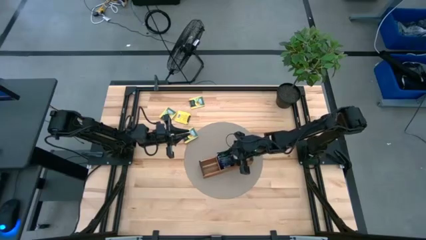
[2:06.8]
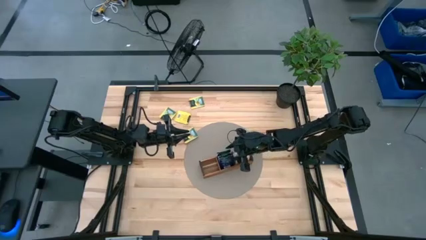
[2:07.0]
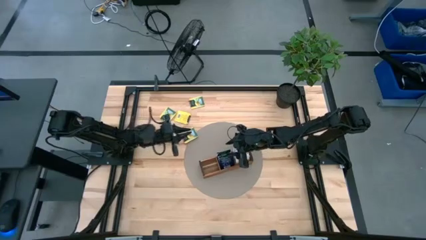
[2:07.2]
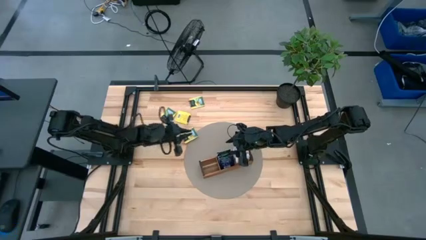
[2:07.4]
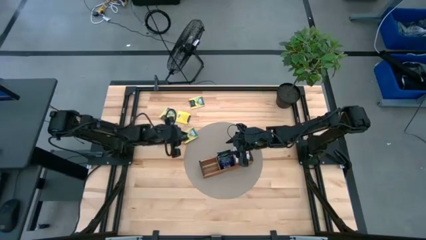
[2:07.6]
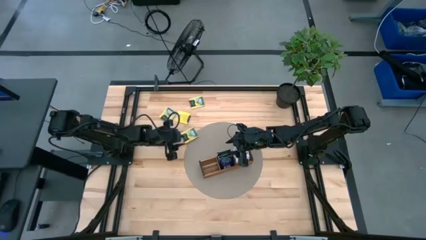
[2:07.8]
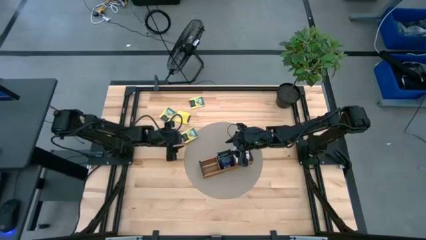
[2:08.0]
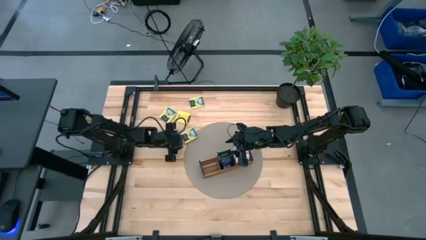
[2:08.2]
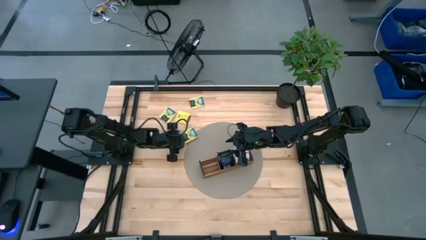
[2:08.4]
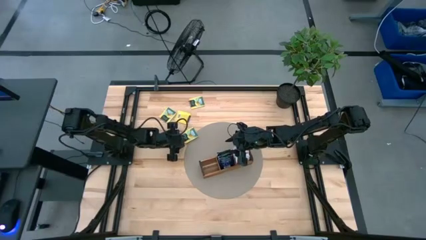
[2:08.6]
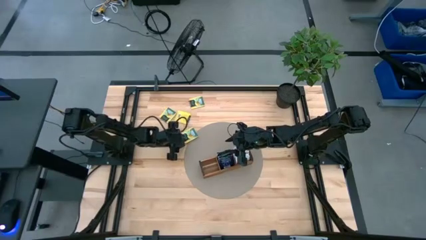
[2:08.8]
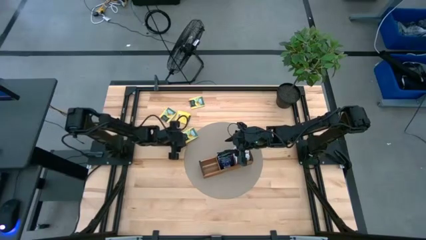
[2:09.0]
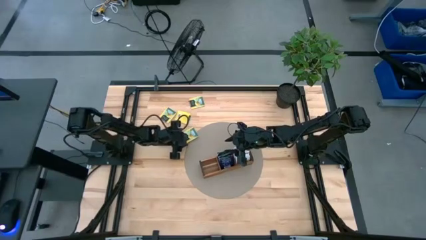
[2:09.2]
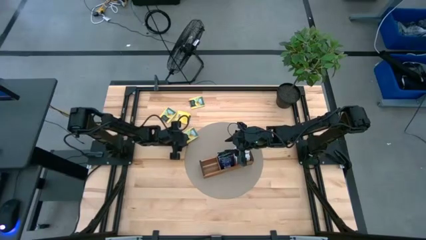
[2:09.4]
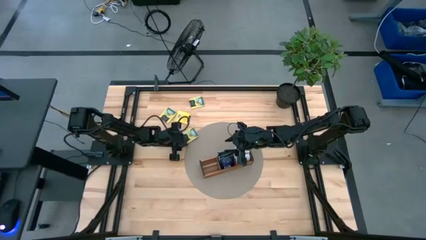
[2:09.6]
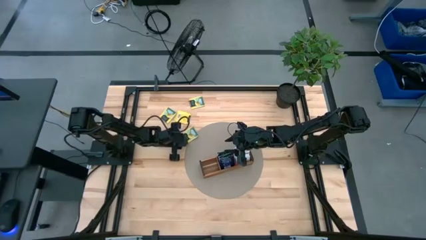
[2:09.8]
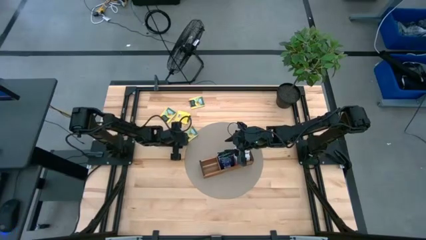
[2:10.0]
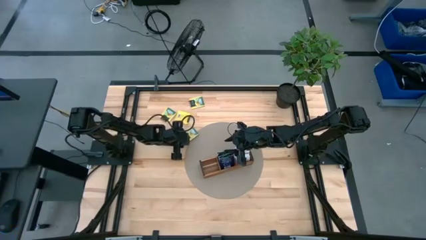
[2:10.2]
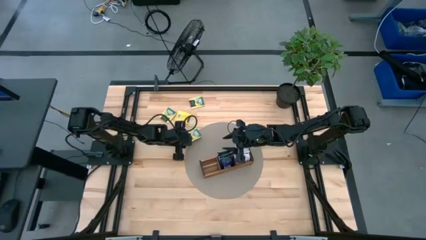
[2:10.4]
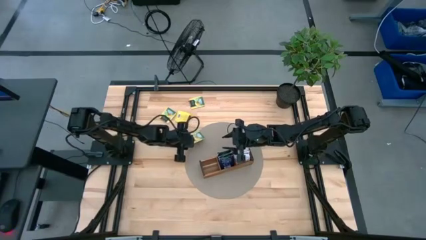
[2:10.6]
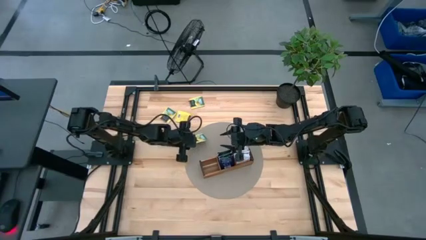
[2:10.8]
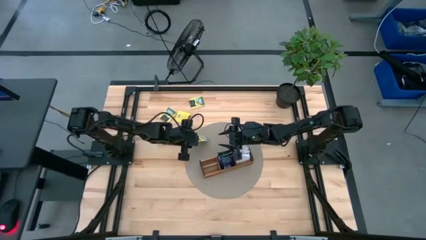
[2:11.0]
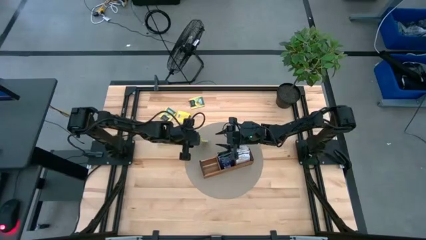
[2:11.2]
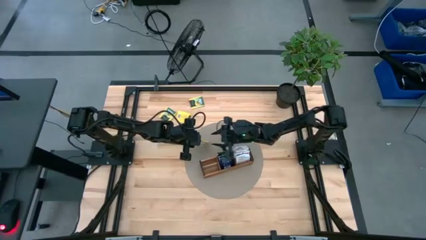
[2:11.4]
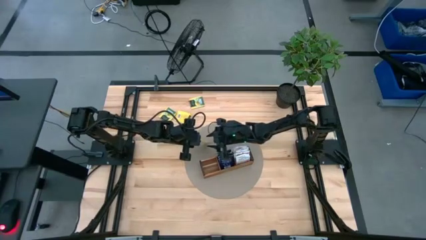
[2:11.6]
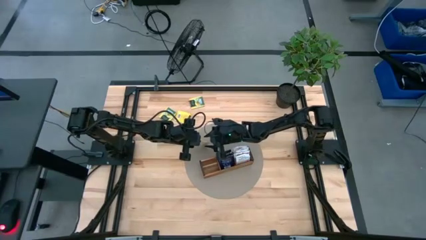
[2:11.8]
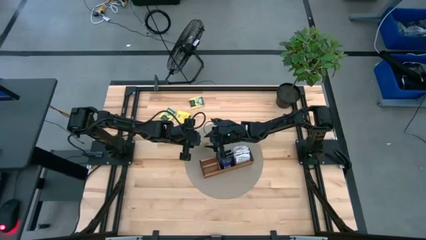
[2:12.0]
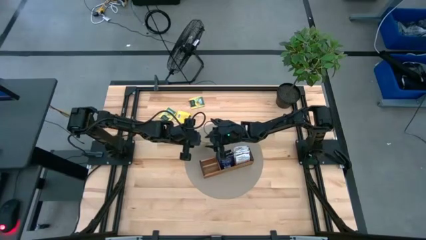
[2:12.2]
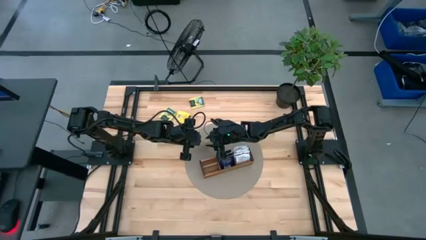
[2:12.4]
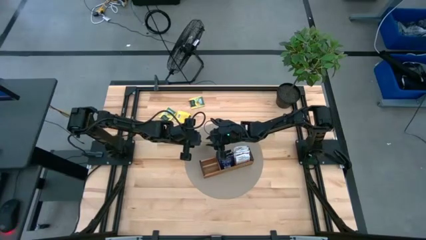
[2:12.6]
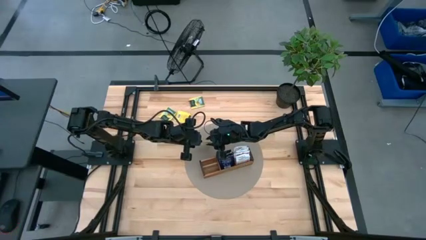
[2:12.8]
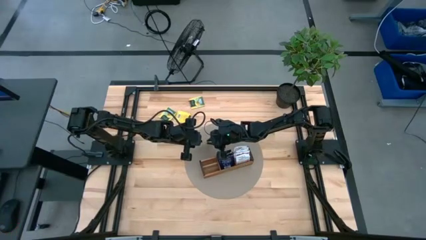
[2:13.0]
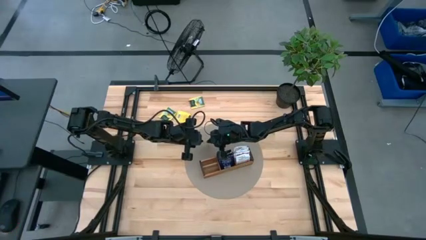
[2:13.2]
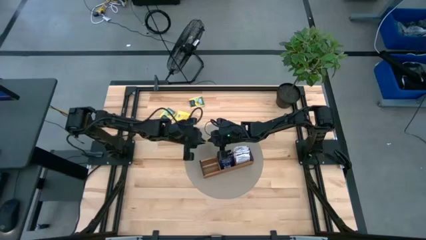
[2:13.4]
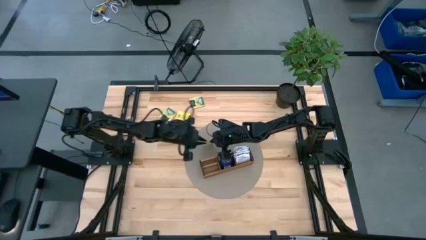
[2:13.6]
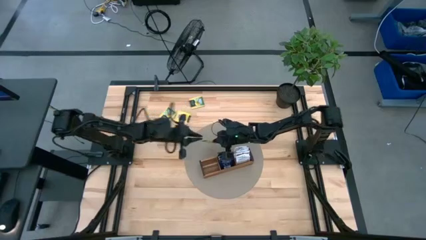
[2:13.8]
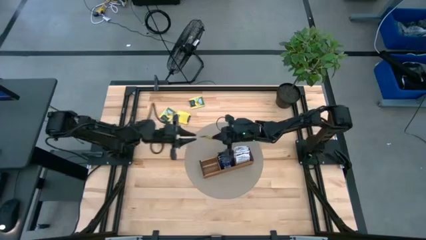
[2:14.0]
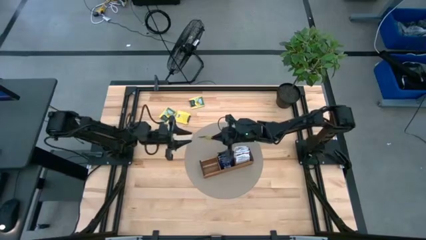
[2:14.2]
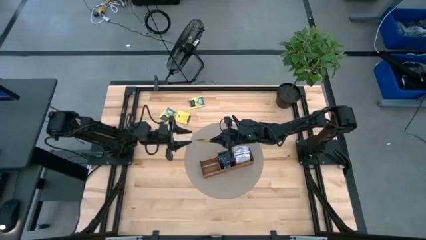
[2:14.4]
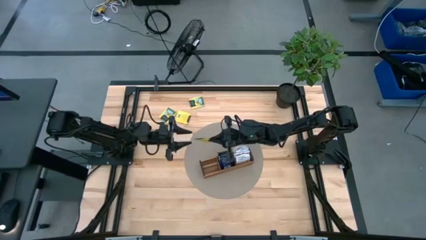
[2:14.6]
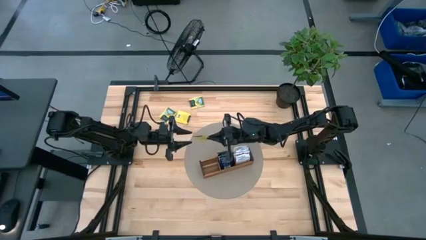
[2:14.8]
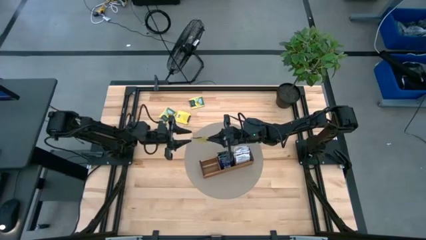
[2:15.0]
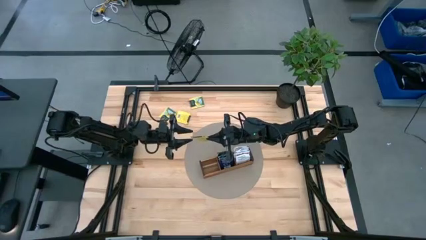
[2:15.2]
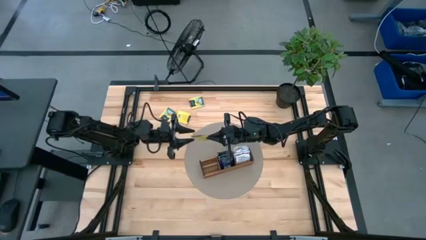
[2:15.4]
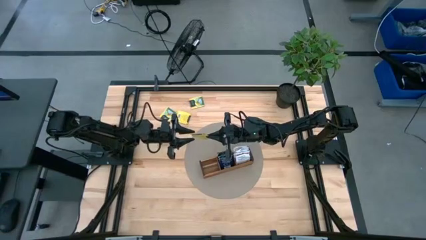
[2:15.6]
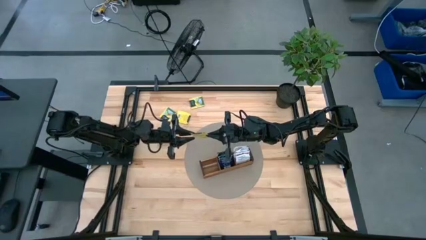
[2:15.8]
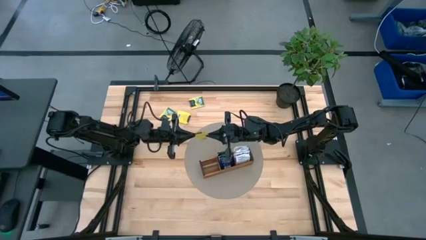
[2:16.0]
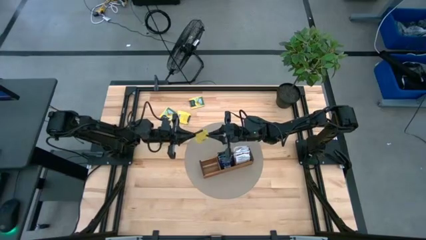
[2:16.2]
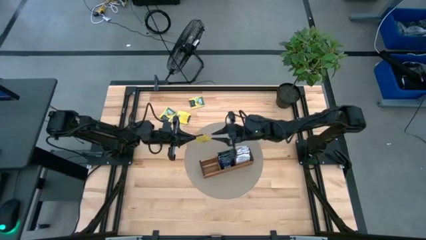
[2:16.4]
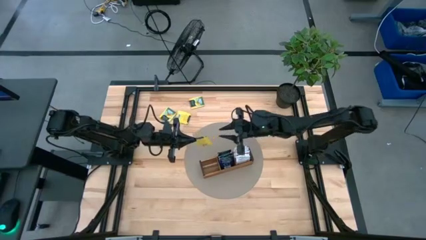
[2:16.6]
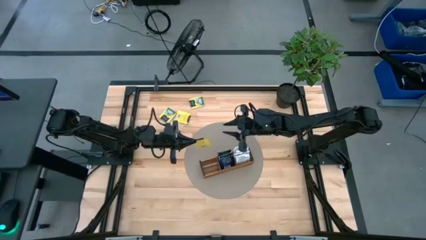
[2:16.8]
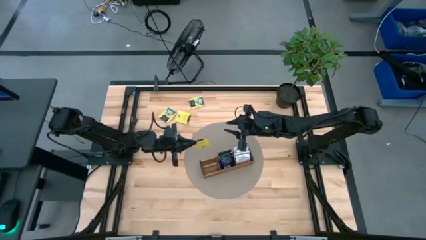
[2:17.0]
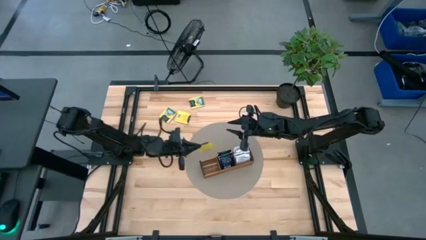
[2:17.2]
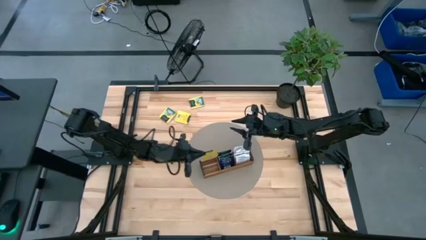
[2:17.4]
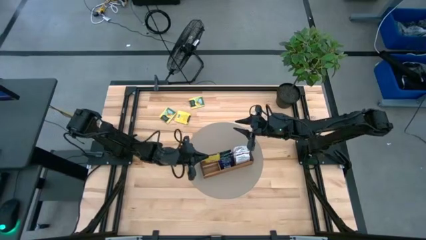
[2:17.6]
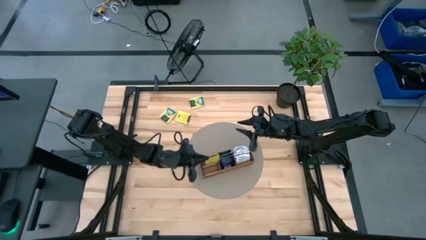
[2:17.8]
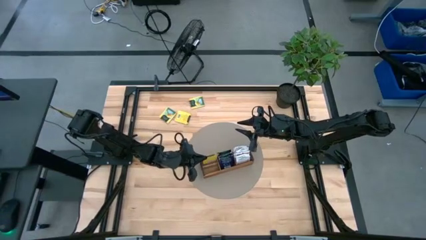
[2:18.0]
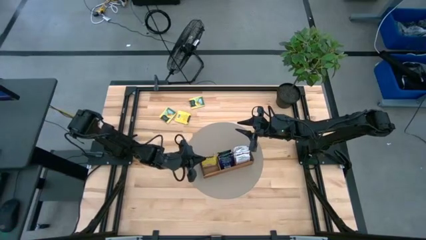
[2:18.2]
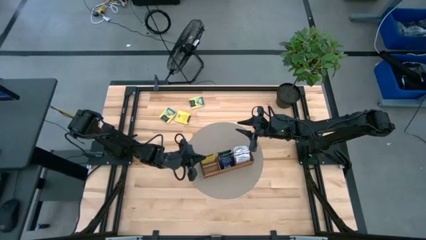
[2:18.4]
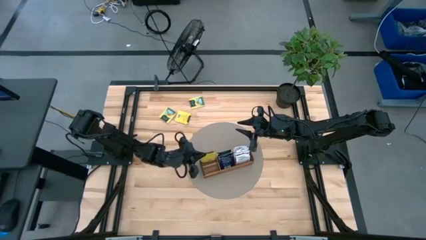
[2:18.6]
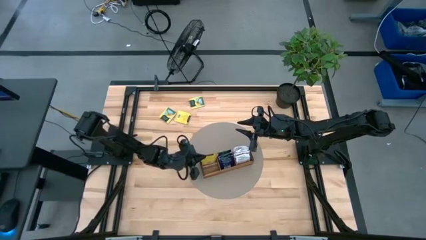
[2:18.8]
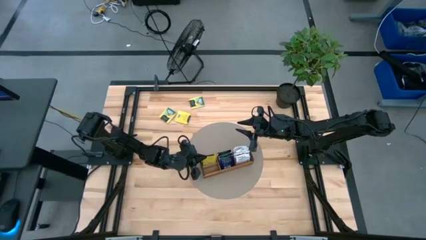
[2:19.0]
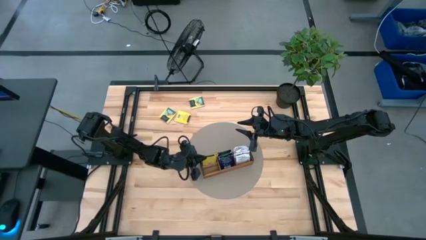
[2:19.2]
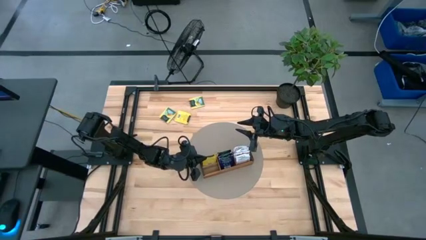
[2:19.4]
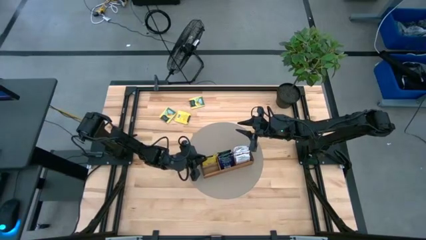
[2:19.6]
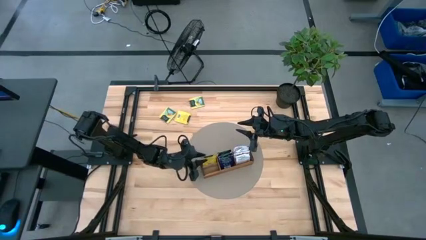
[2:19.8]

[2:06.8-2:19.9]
Task: Pick & Place Tea
Put the yellow tea bag into the left section of the wooden organizer

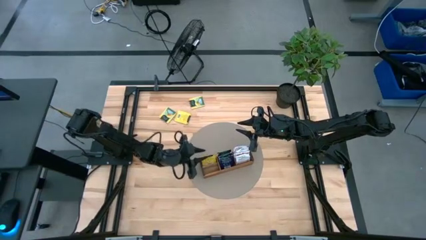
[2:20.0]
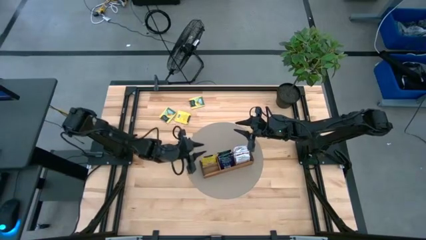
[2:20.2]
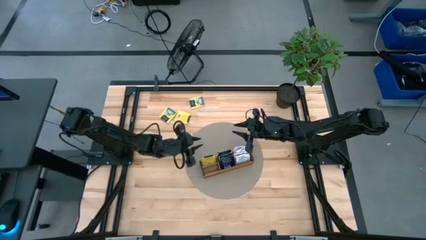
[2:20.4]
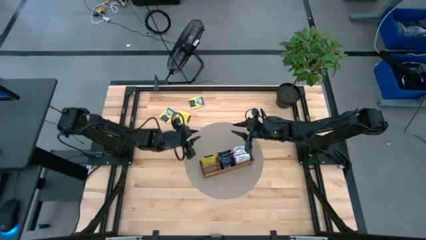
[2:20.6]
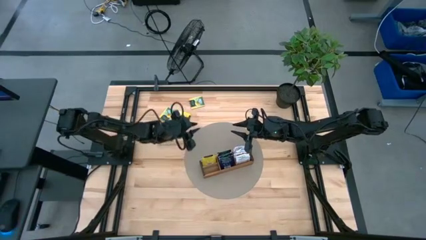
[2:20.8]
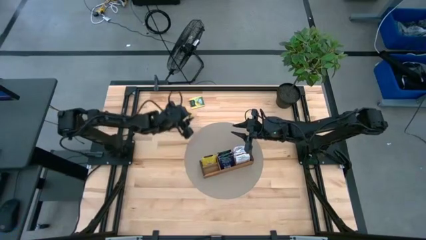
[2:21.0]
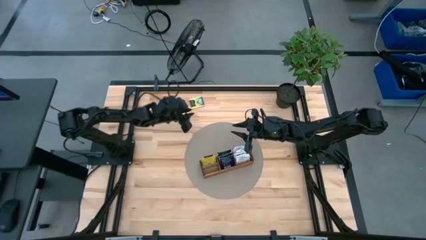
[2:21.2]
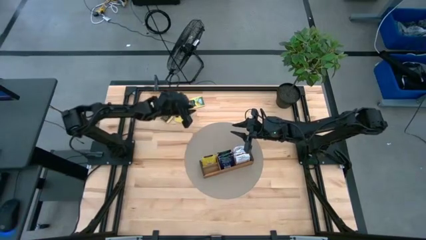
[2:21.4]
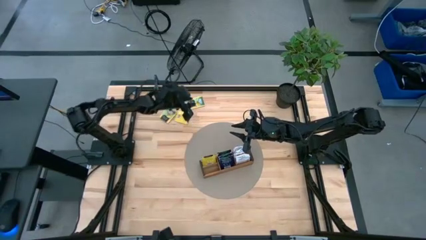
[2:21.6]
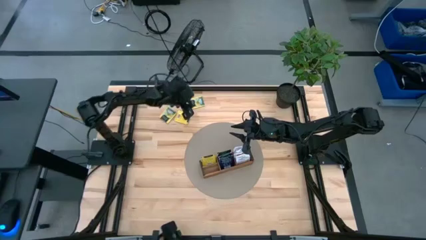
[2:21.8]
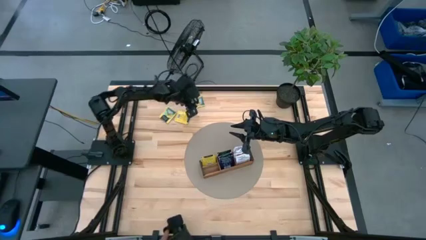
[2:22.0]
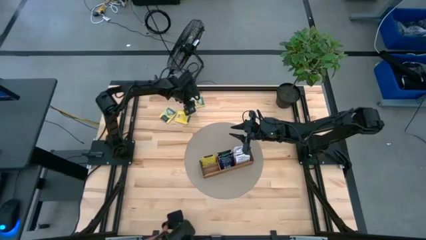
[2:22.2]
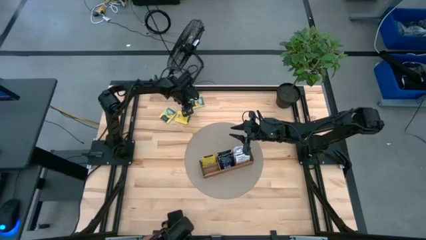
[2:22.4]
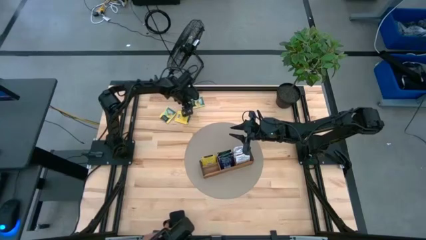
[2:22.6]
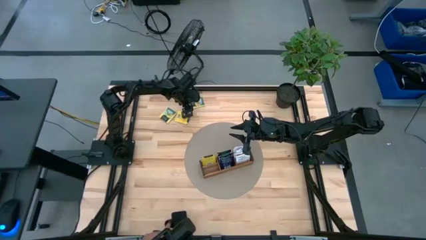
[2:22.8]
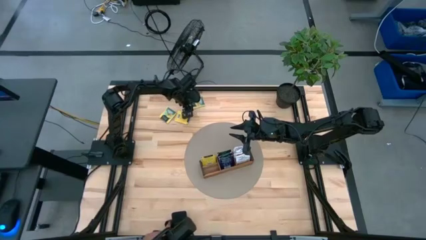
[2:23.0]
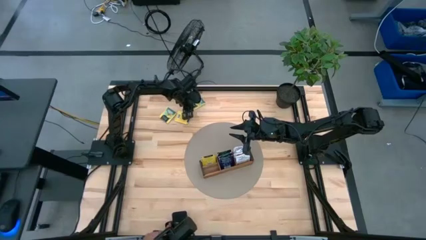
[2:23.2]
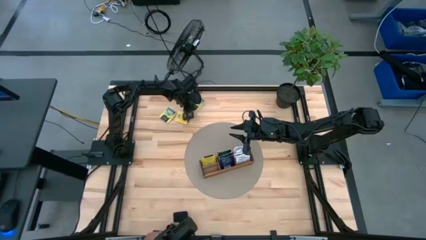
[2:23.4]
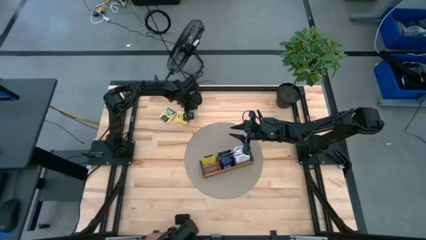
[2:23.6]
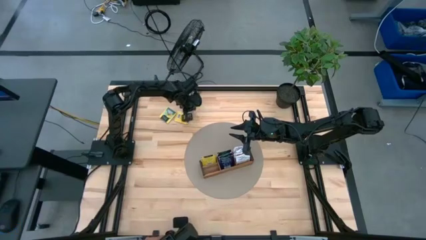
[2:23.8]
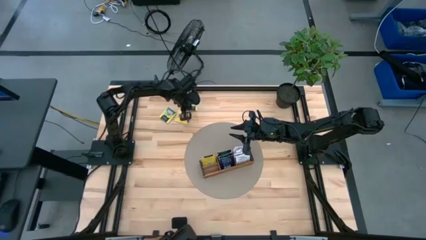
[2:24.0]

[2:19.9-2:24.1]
Put the yellow tea bag into the left section of the wooden organizer
